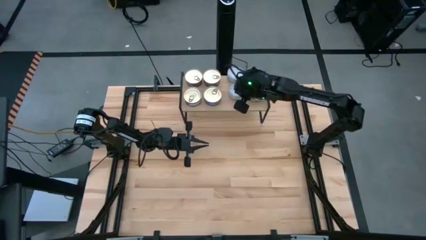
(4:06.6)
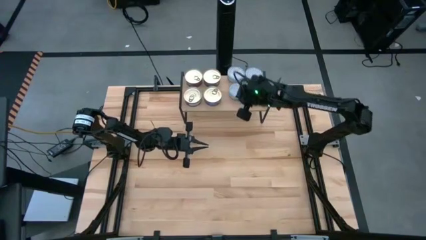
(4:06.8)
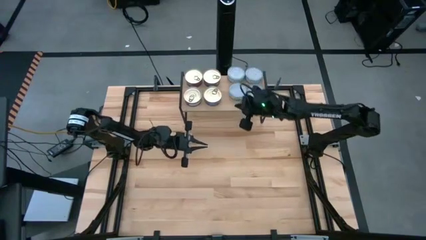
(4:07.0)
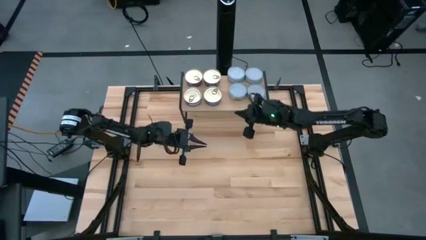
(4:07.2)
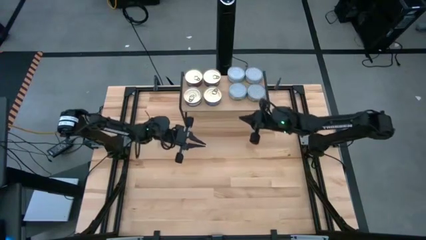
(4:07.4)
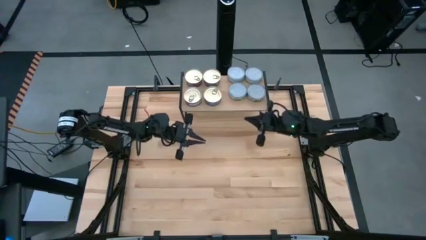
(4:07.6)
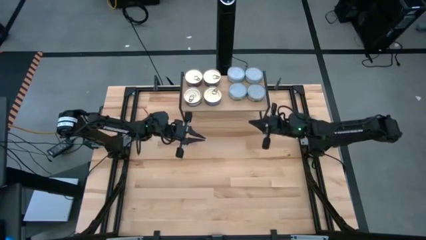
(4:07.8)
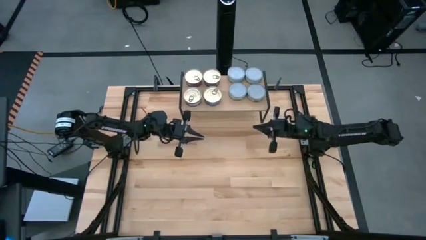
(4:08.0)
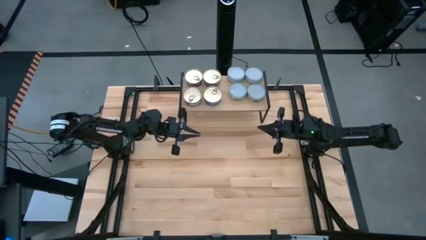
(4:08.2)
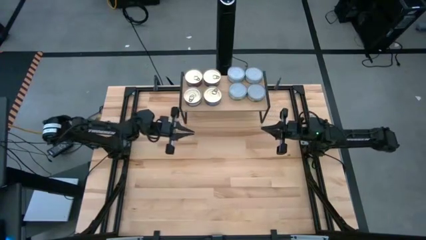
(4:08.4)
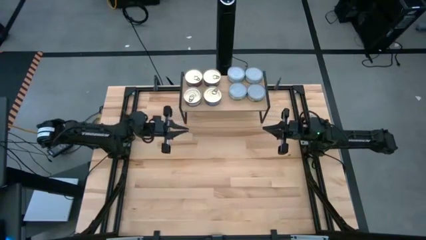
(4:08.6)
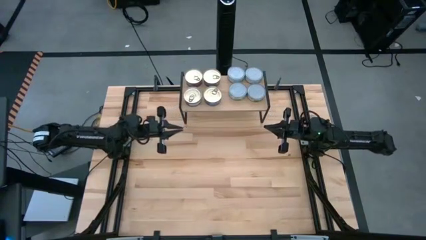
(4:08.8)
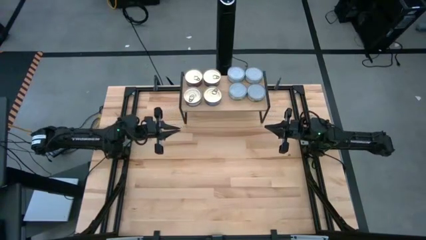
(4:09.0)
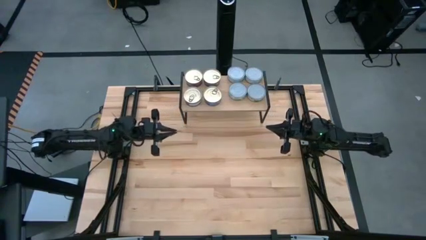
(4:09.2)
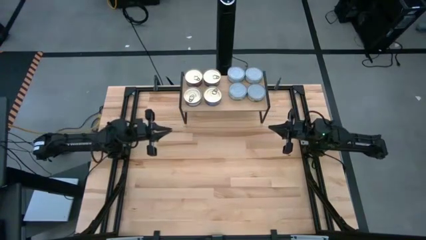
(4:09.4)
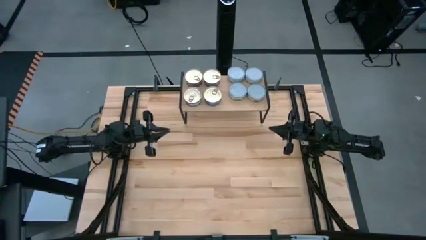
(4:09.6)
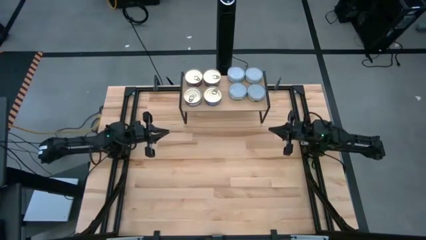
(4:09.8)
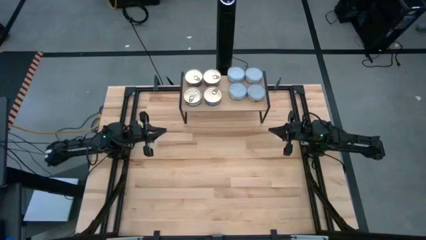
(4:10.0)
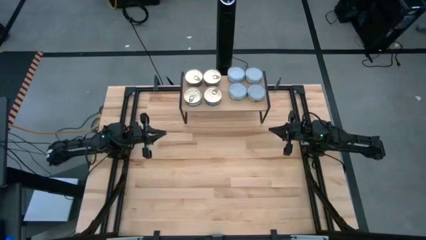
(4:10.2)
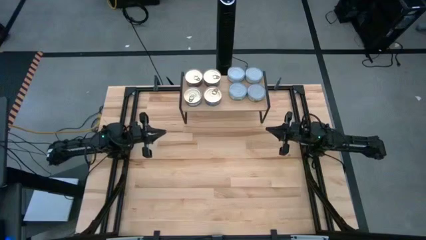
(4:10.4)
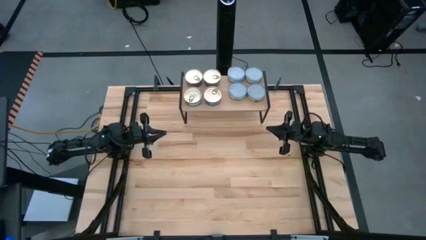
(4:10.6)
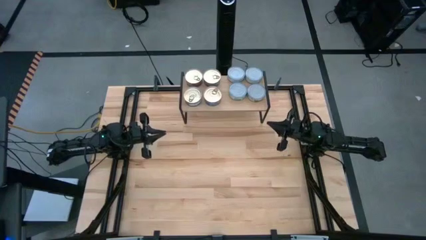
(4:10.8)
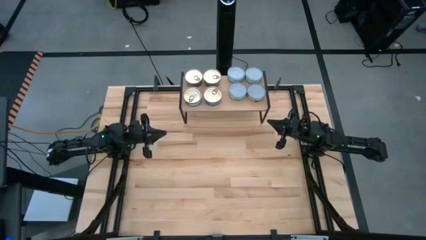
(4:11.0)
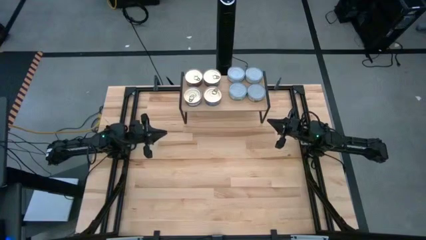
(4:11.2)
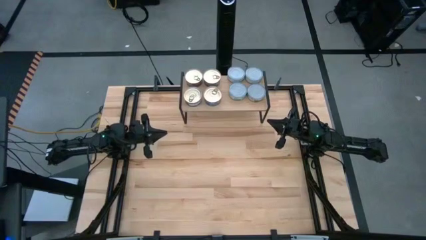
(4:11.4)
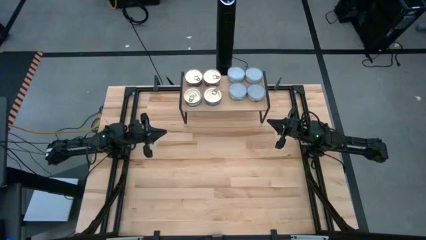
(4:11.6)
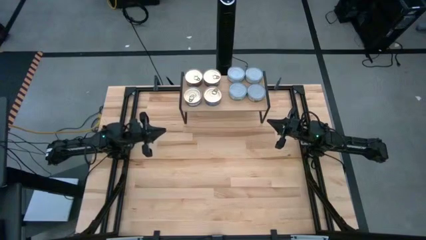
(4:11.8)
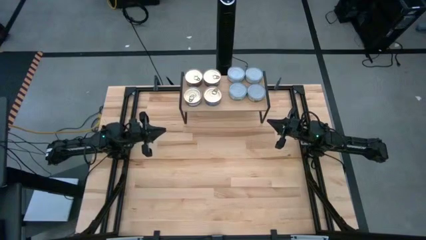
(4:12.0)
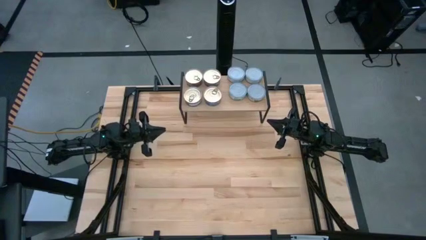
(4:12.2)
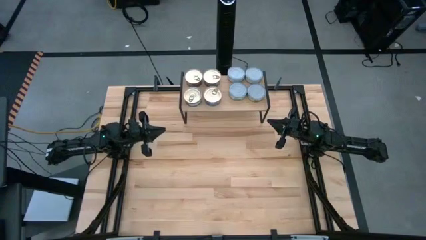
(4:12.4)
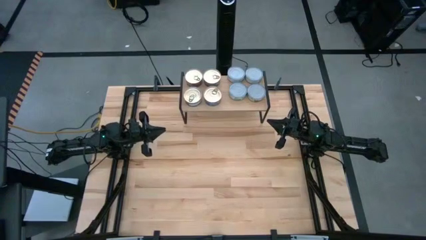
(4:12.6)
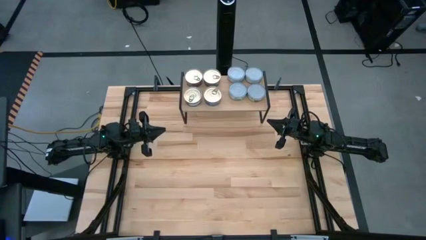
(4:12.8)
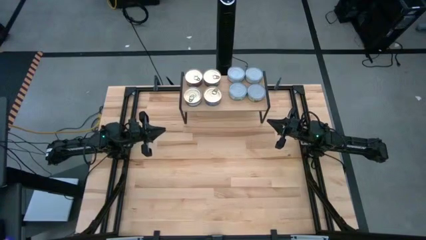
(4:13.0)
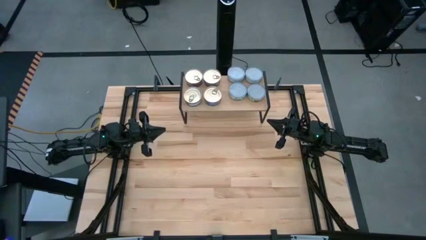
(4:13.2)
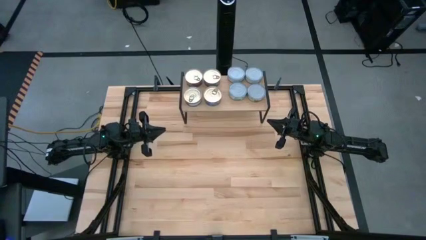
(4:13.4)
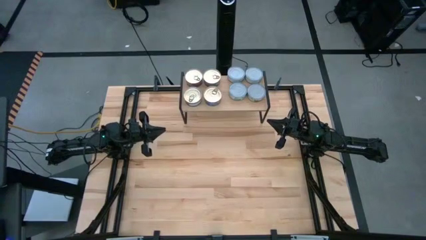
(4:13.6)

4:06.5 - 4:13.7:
Task: Stack canned seafood by type on shelf
Return to Home Position

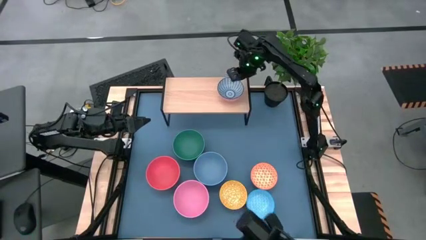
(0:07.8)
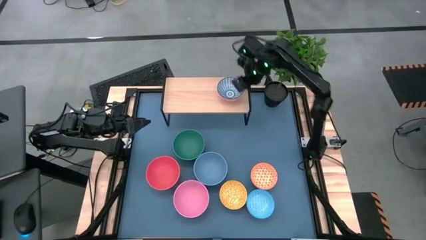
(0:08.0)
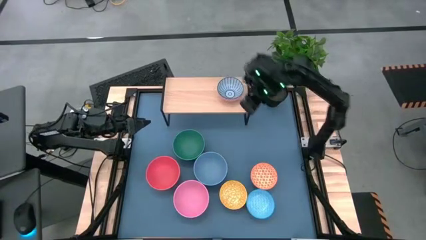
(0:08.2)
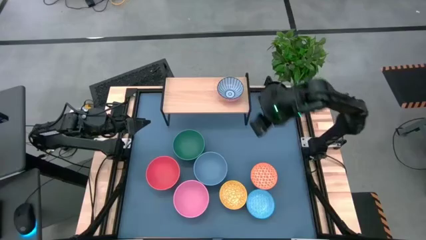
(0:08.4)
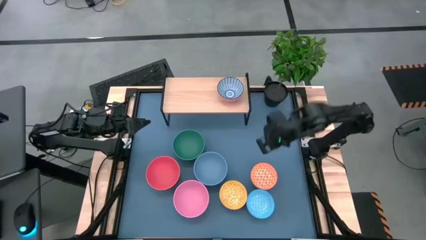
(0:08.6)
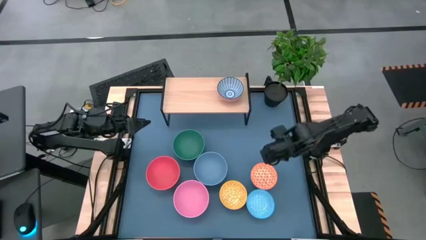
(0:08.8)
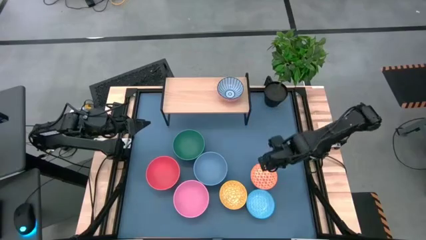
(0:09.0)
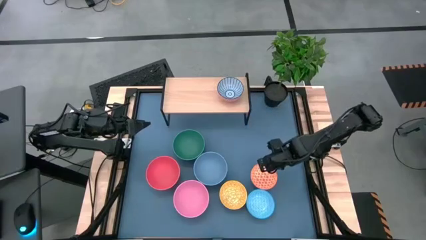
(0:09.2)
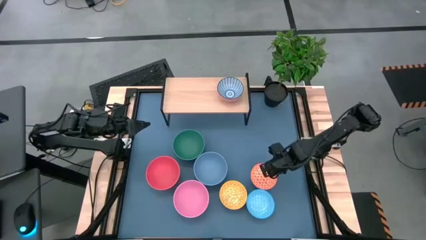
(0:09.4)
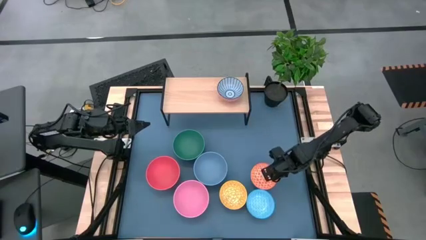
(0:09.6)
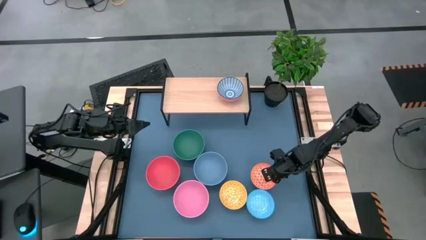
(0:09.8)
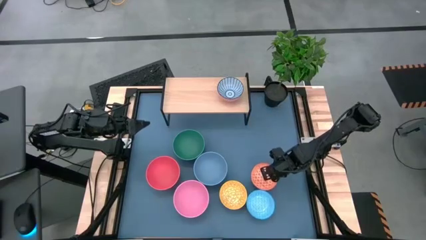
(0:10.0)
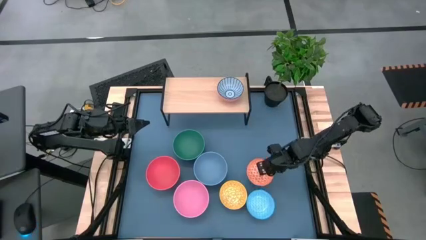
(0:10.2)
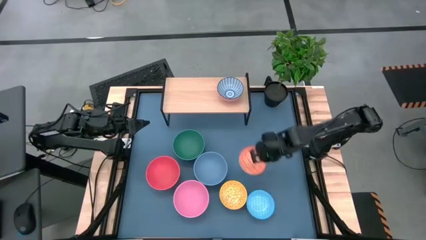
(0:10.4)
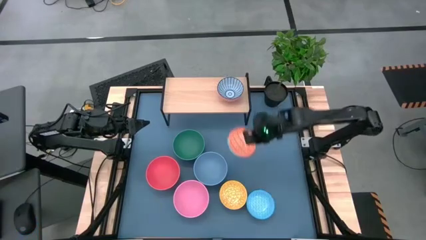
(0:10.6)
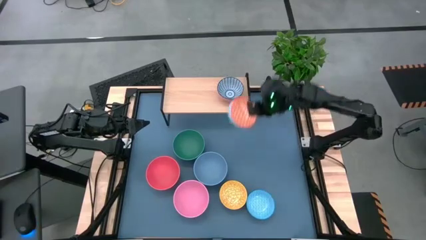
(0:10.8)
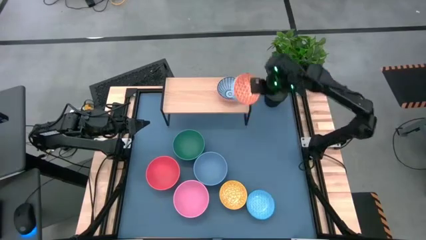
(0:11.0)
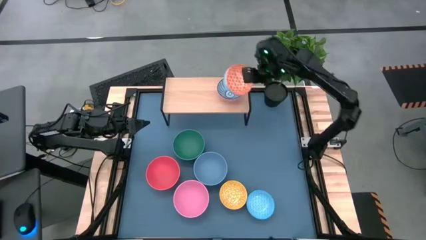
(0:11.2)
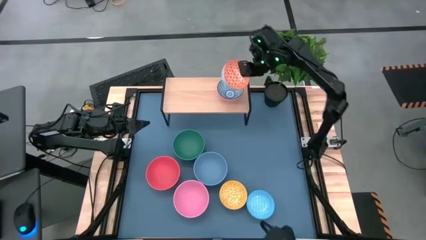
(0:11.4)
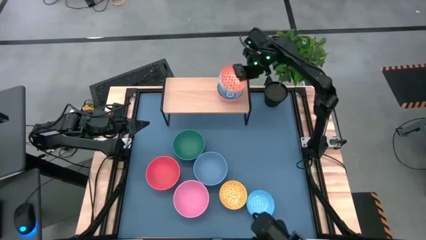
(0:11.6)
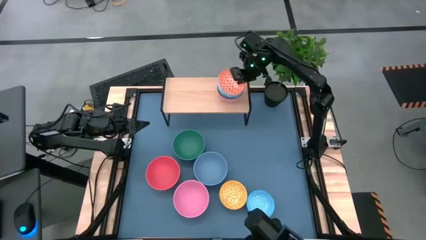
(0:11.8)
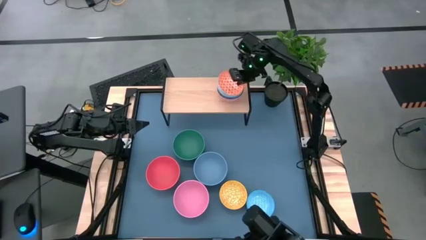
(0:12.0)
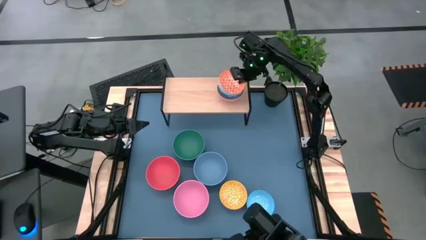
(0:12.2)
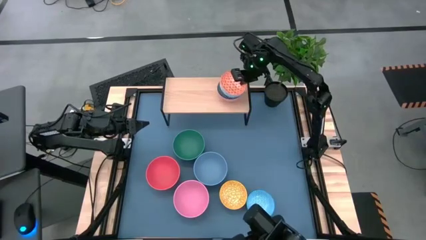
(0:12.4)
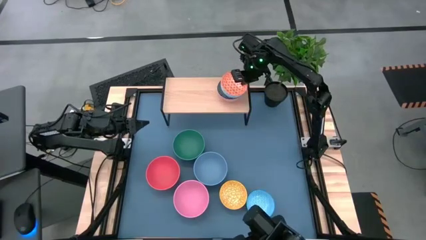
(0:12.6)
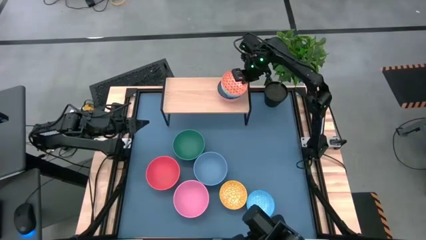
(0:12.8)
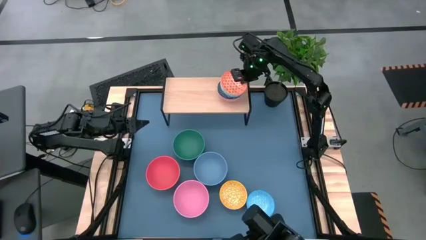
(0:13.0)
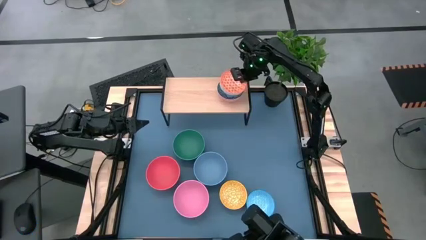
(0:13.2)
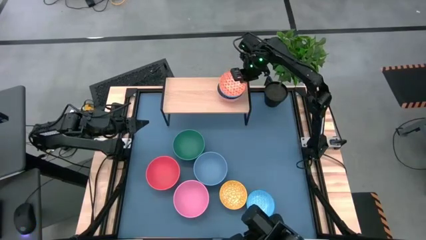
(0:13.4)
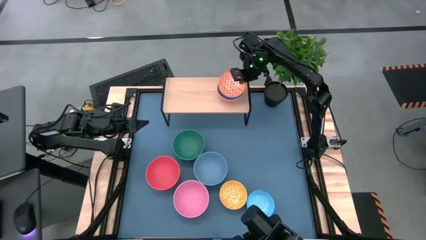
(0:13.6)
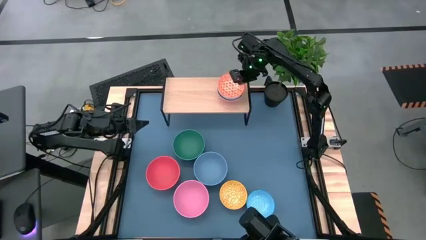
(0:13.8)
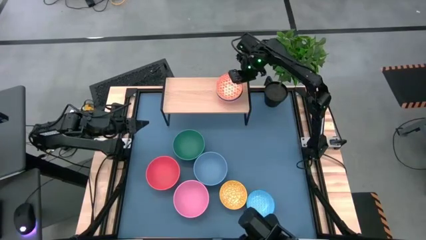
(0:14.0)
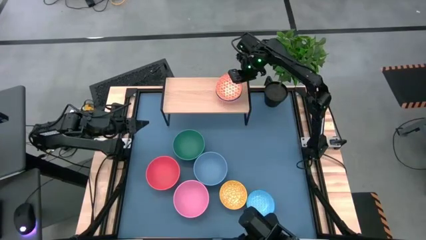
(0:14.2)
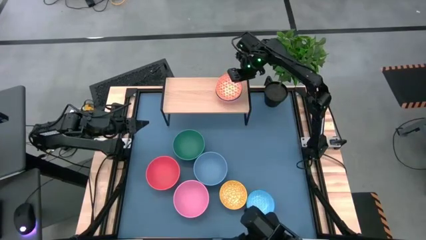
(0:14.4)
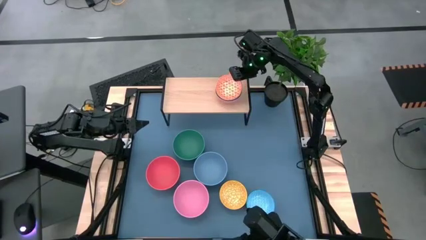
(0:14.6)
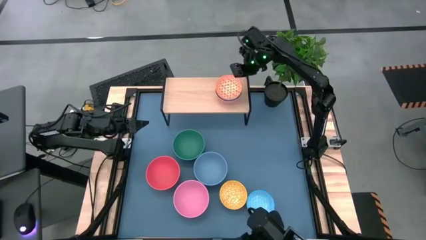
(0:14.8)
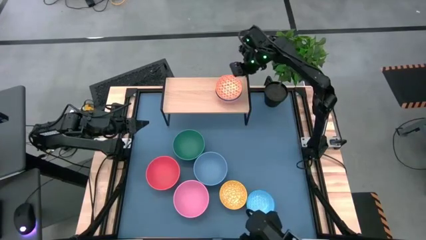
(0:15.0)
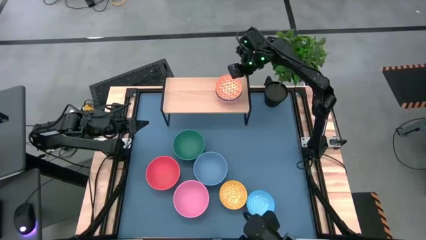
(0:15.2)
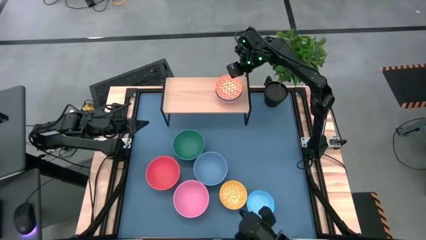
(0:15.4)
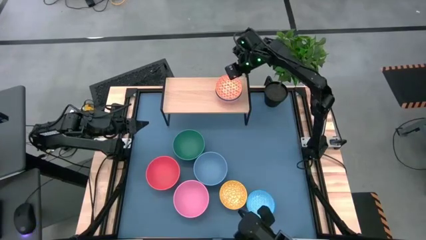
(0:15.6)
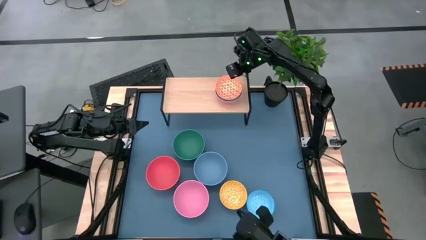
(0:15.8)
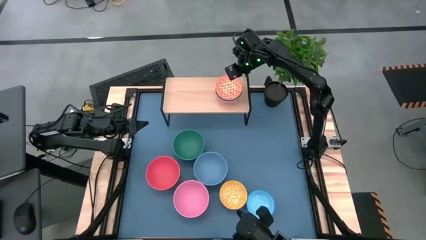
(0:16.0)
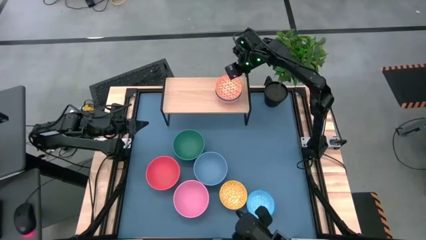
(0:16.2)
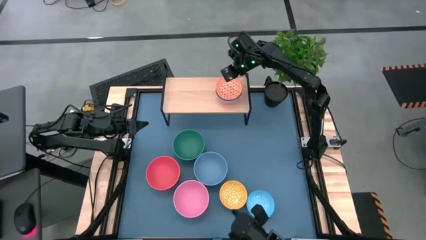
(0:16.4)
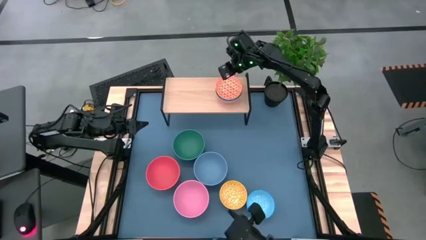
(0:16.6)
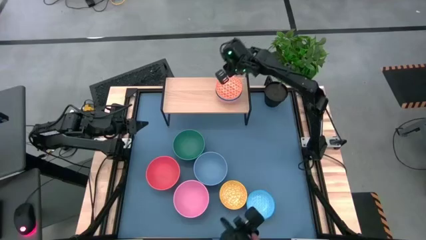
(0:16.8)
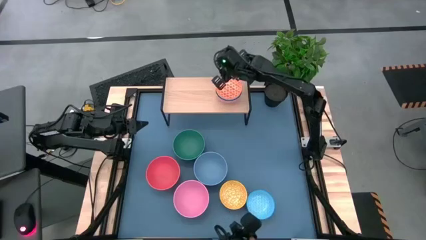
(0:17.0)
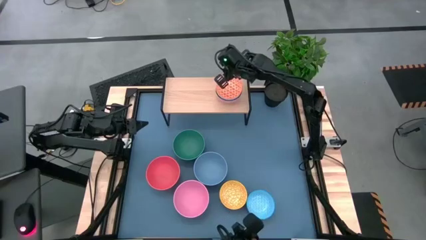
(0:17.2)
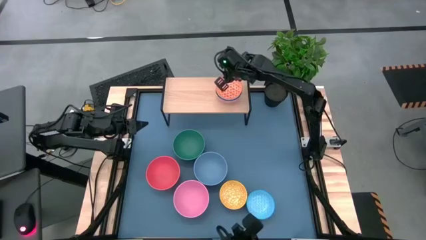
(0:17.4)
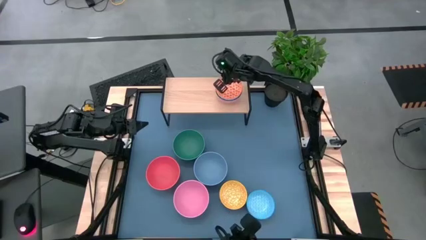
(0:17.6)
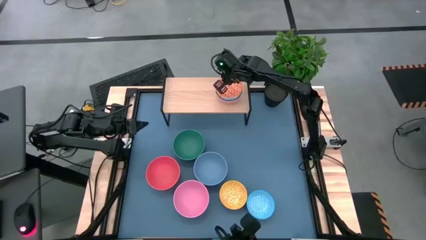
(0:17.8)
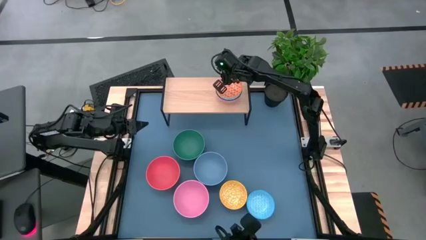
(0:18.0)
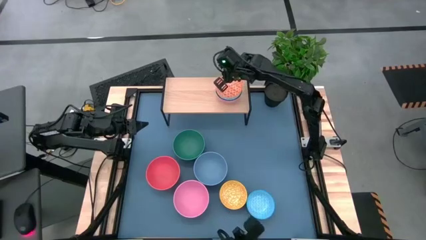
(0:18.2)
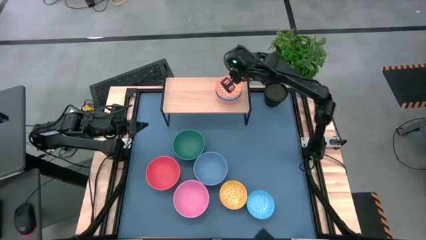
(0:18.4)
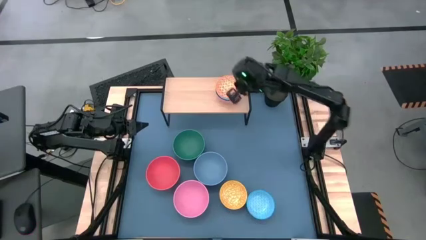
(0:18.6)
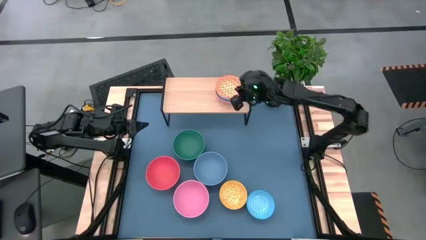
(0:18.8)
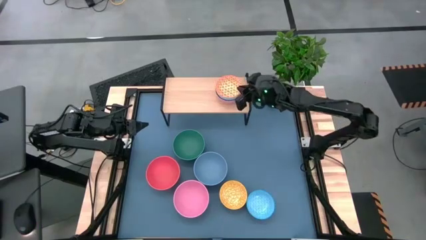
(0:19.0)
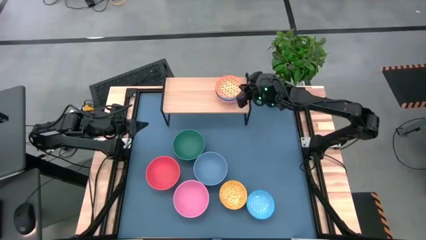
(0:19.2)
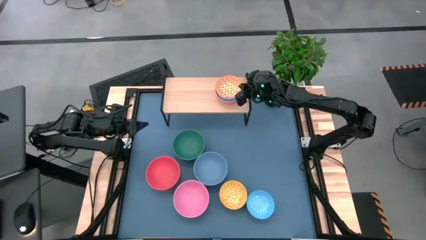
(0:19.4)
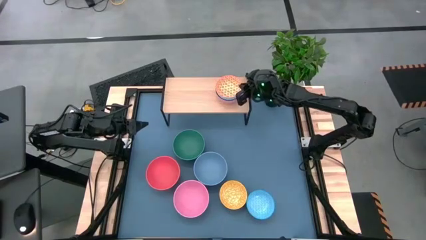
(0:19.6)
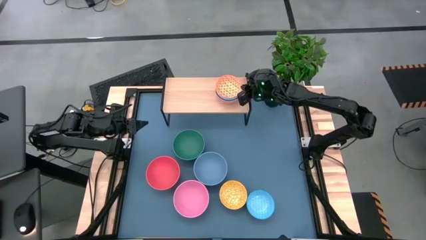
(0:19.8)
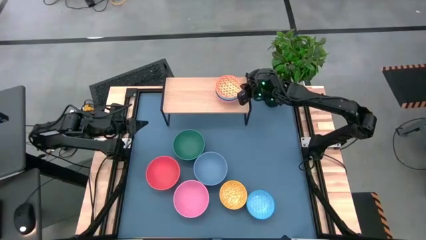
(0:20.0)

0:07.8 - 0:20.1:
Task: Place and stack bowls onto a shelf
Stack the orange-patterned bowl on top of the blue-patterned bowl on the shelf
